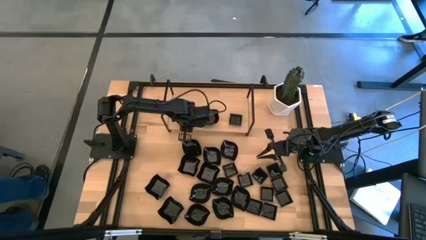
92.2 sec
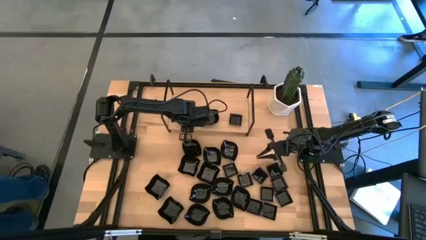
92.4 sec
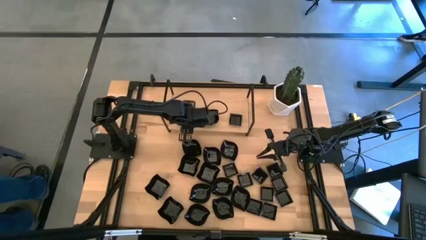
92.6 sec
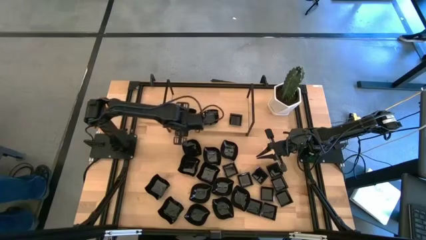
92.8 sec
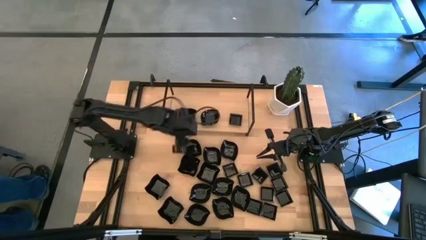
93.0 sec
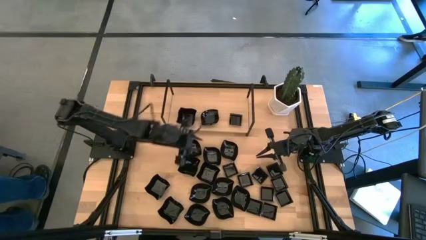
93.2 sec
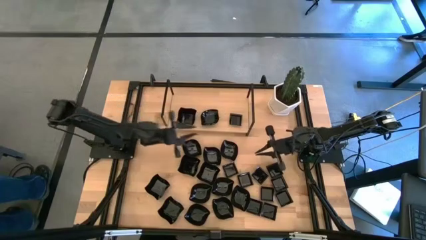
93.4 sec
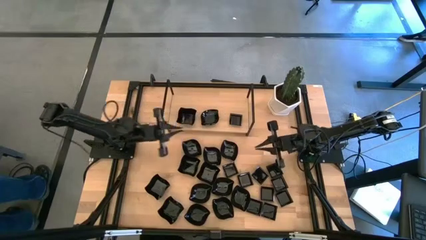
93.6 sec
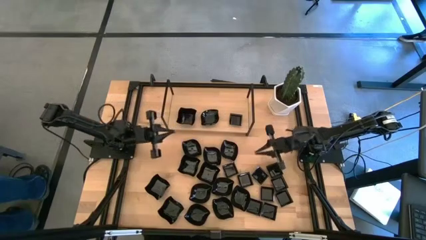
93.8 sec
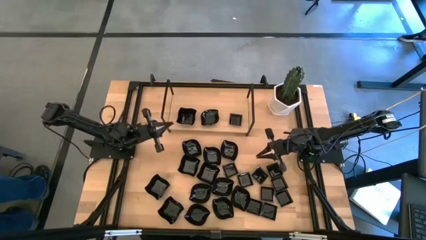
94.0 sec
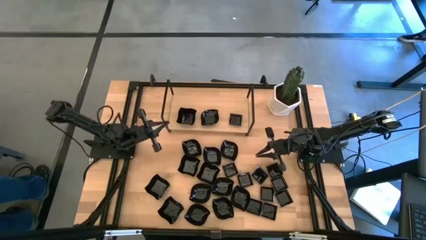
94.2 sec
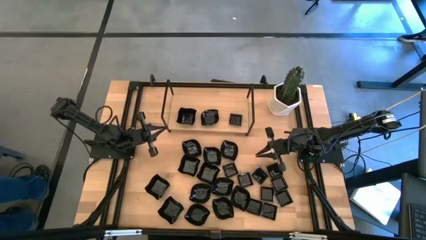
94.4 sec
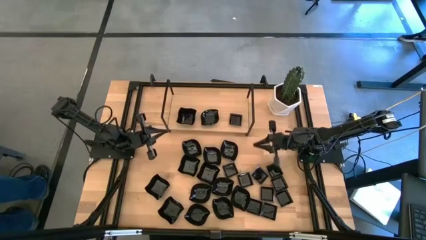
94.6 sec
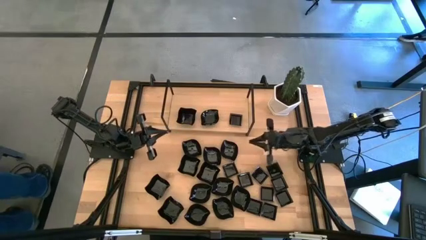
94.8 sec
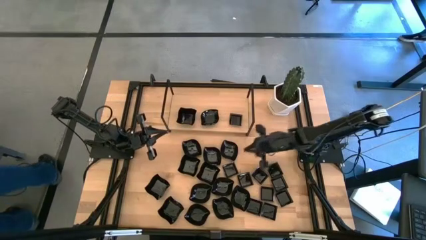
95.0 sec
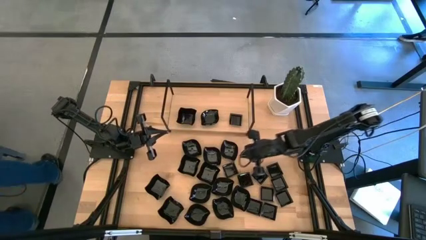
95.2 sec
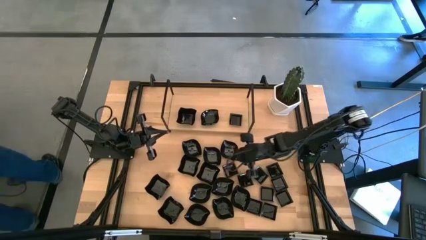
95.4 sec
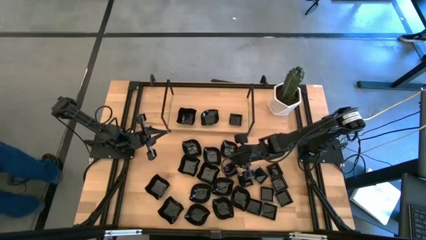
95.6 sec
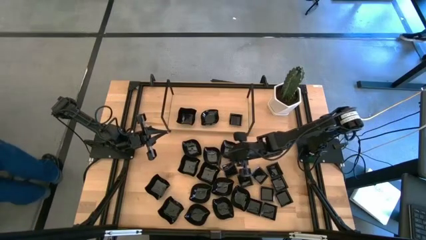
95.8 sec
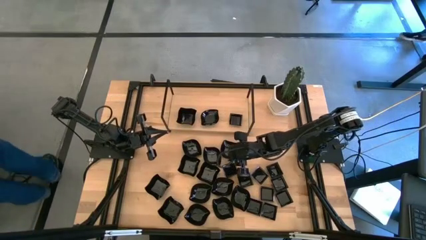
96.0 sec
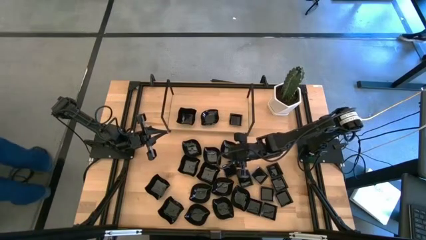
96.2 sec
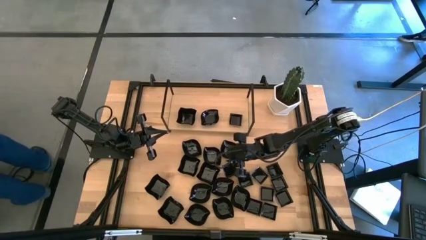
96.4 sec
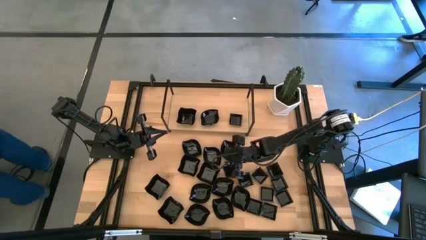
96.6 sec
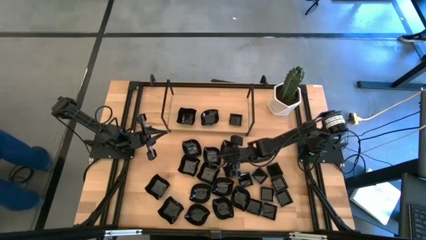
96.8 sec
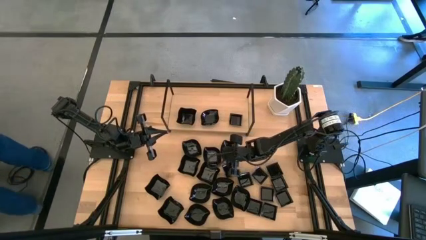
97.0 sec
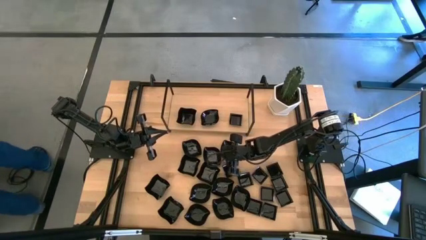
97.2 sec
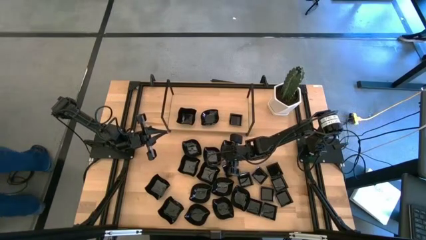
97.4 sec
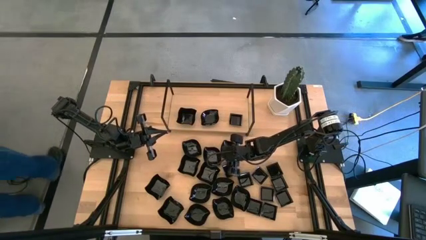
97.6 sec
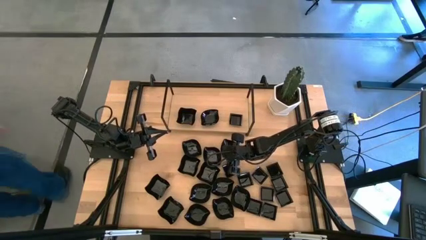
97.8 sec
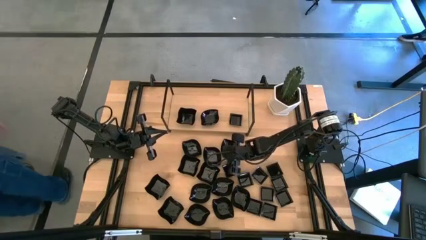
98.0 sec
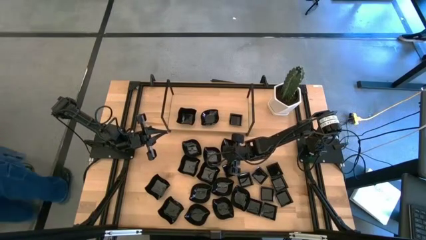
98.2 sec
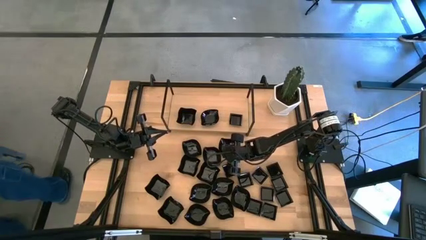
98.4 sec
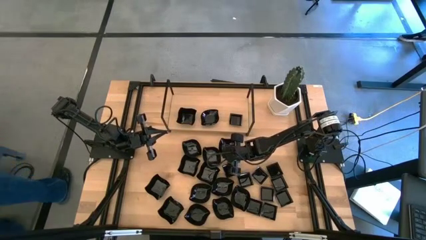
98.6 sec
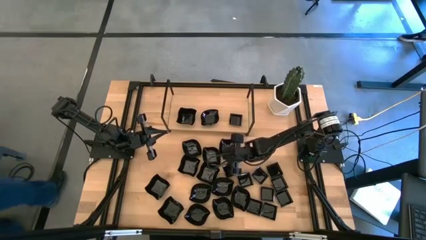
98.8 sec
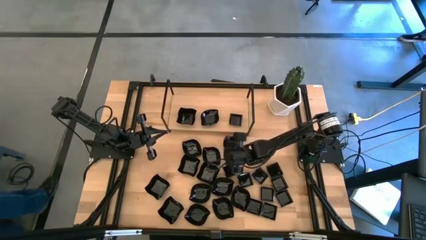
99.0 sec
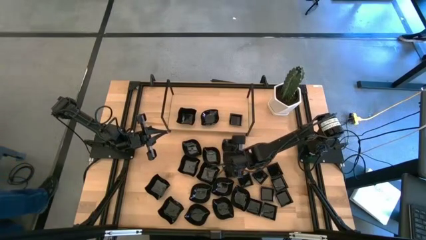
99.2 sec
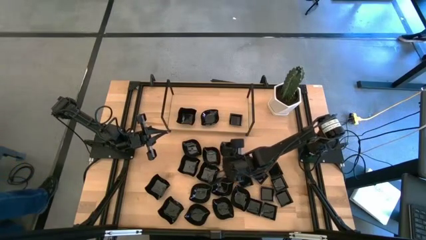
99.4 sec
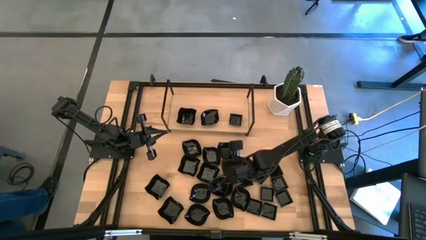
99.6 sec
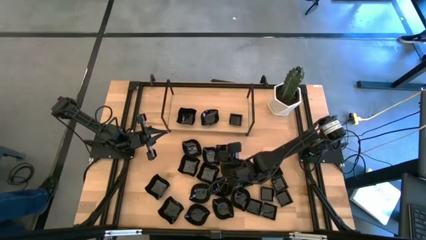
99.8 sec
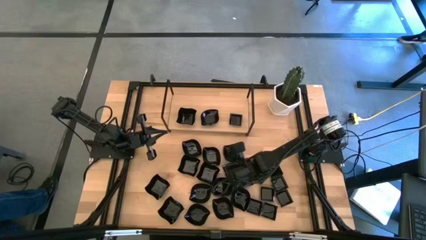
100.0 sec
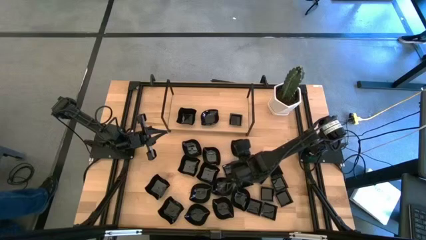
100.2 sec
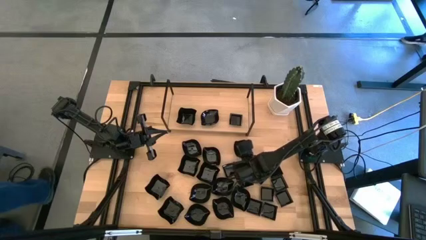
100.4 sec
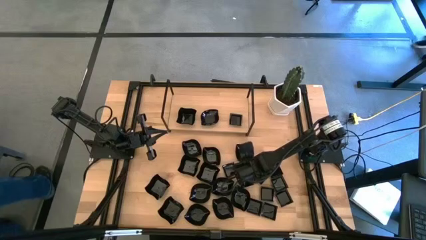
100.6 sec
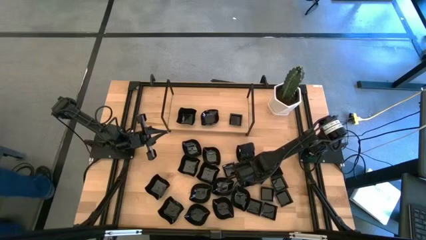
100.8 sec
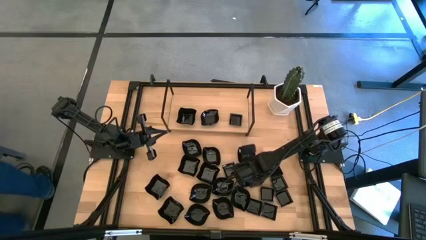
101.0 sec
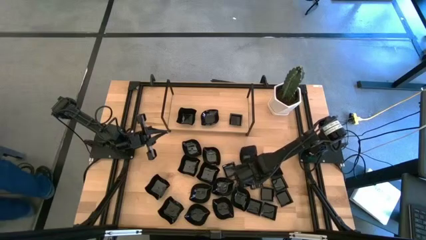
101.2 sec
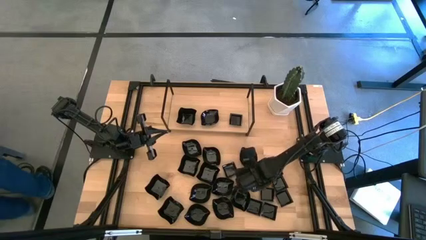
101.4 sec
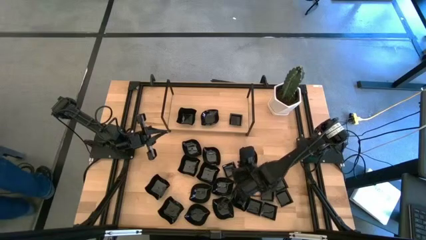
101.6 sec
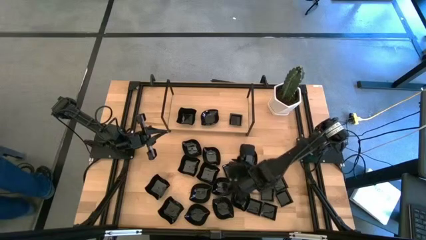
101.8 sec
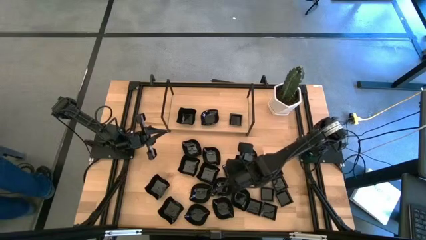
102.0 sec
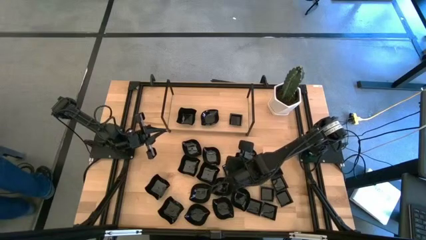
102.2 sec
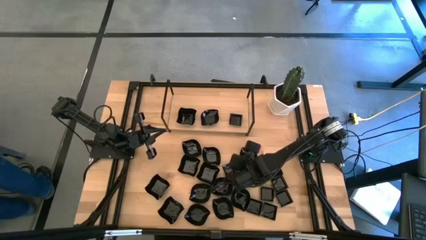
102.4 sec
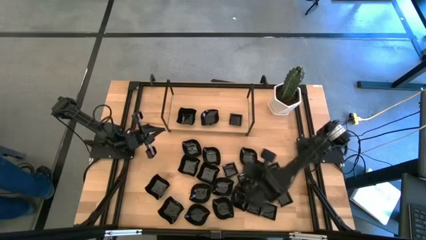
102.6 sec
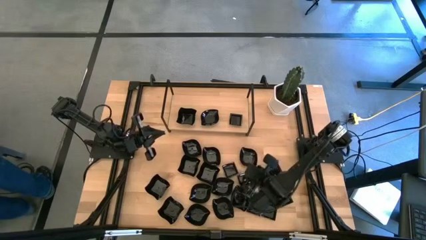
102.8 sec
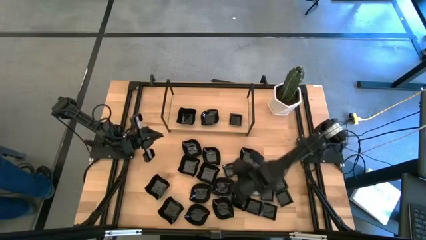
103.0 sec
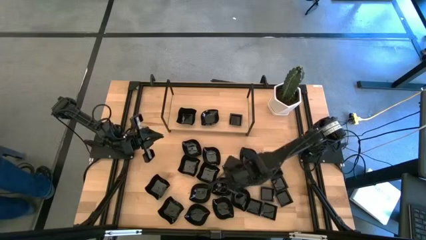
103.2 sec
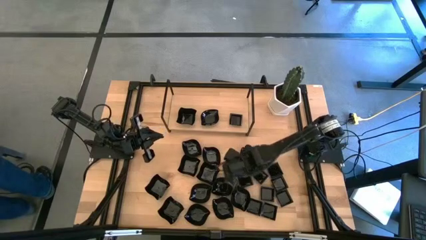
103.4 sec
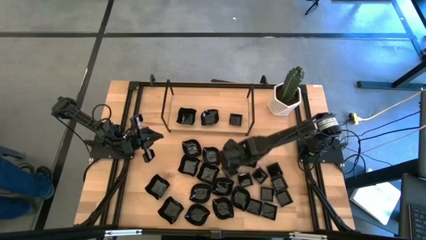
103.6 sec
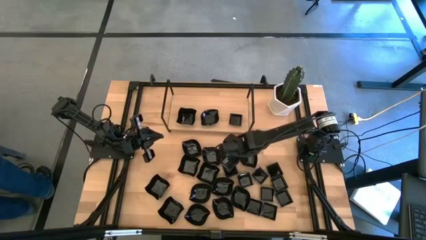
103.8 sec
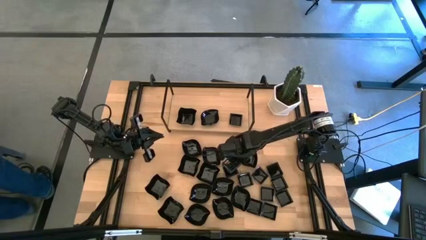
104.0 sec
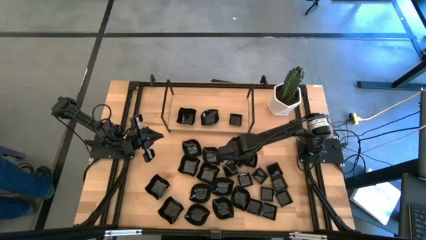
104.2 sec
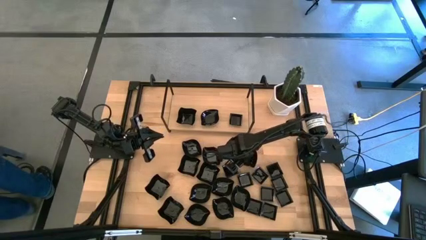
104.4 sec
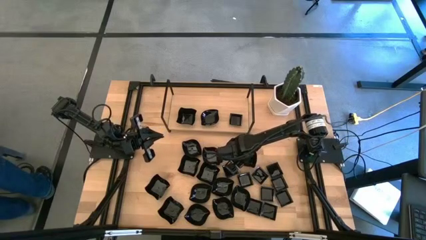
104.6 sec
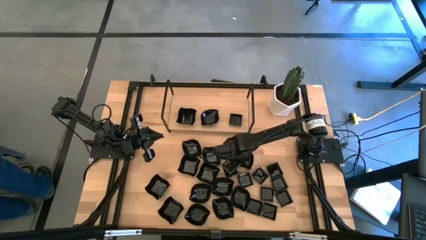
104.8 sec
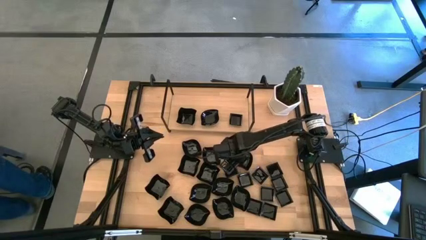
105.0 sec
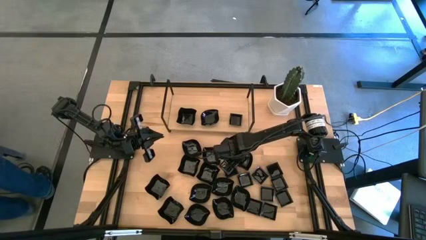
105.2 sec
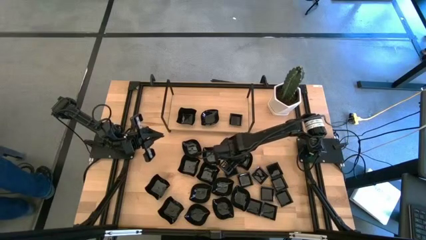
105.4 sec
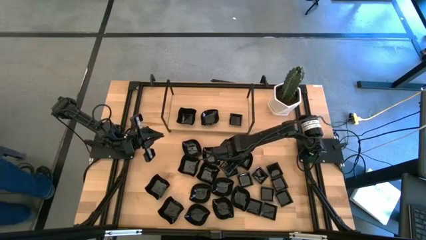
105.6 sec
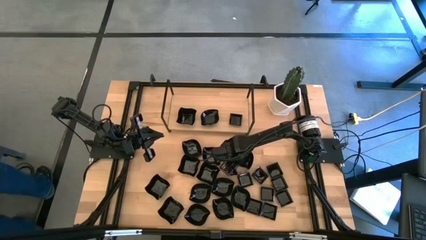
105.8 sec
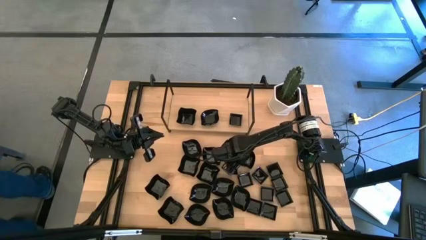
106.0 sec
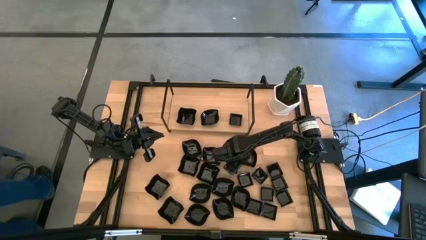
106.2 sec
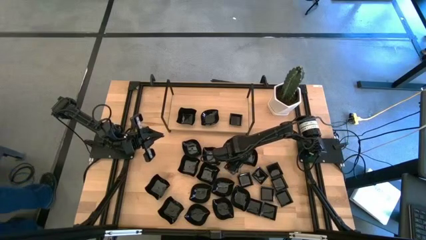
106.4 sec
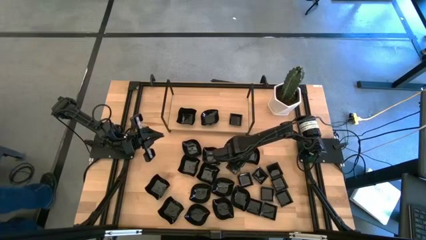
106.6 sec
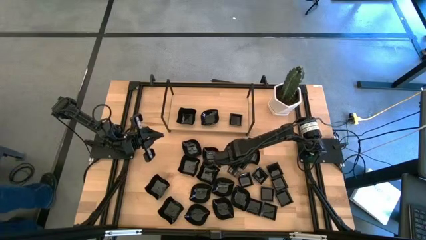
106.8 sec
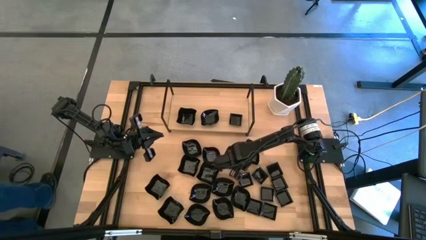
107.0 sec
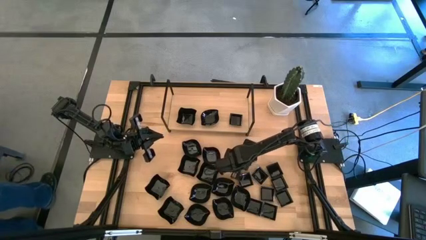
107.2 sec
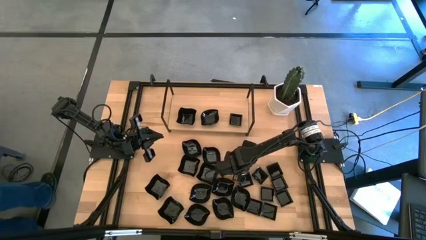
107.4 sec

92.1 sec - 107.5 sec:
Task: Pick & Place Mini shaped plates
Stack the leaf-shaped plate on the top of the leaf-shaped plate on the shelf

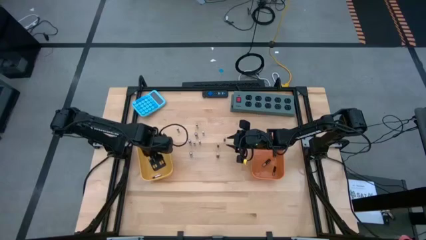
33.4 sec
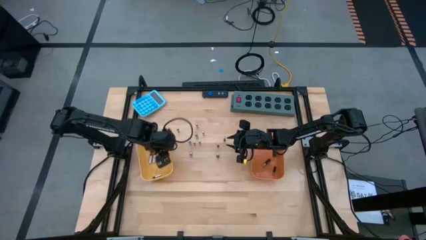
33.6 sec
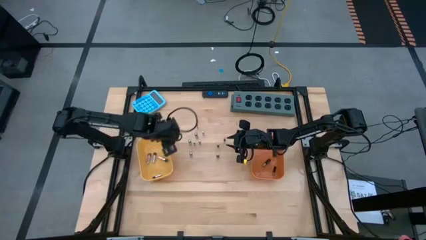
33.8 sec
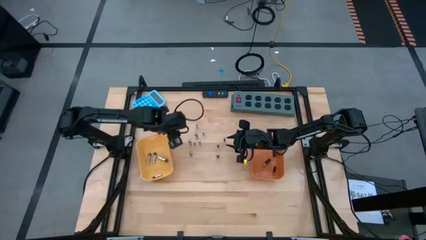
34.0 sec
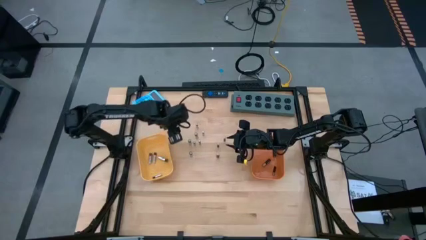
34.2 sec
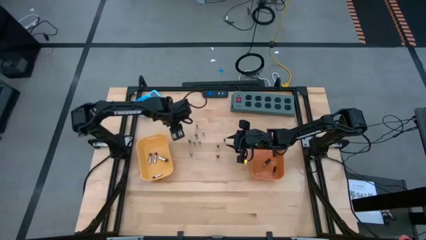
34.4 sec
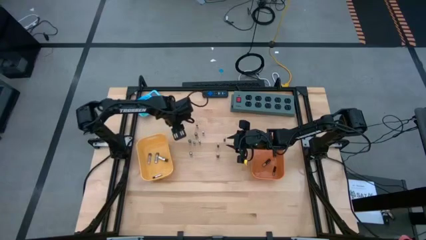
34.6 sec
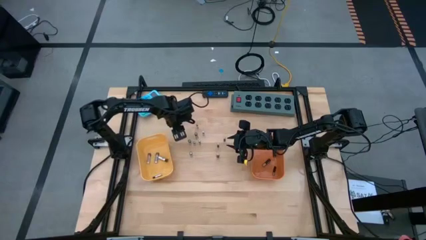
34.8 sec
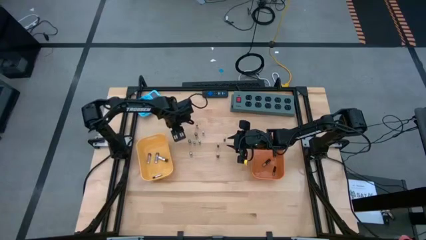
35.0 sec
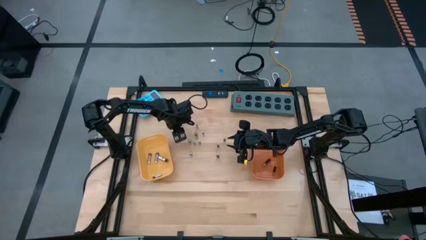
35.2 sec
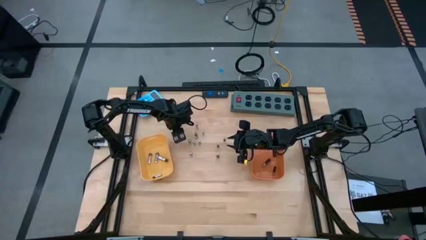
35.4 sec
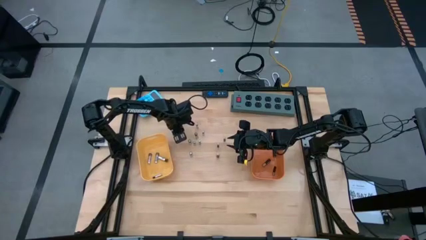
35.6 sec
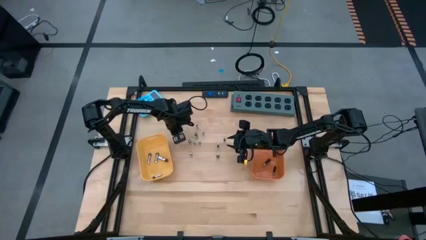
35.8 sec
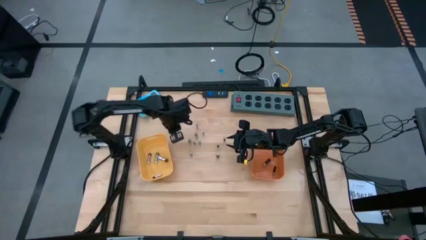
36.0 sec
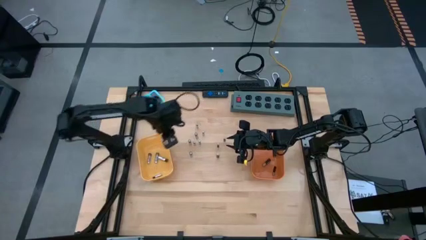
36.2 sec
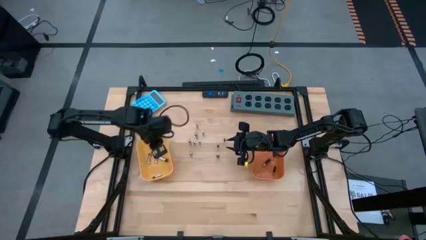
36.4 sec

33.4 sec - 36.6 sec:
Task: Sort batteries
Put the silver battery into the yellow bin
